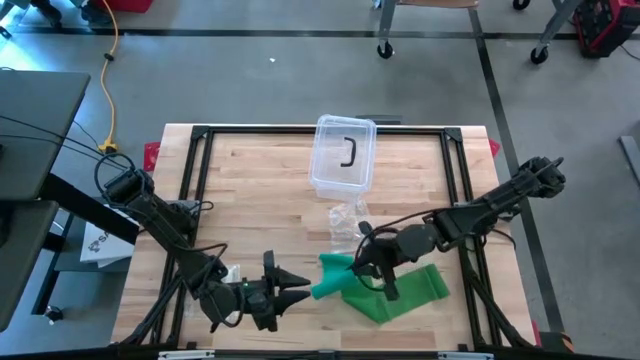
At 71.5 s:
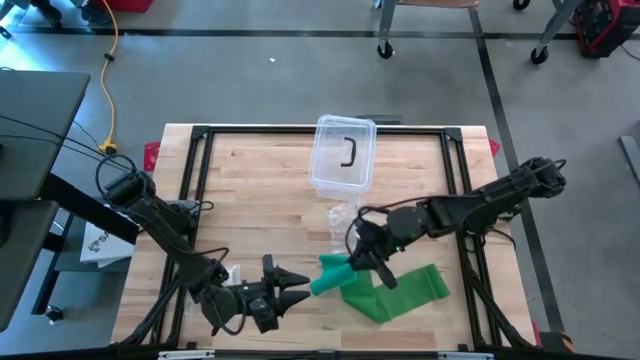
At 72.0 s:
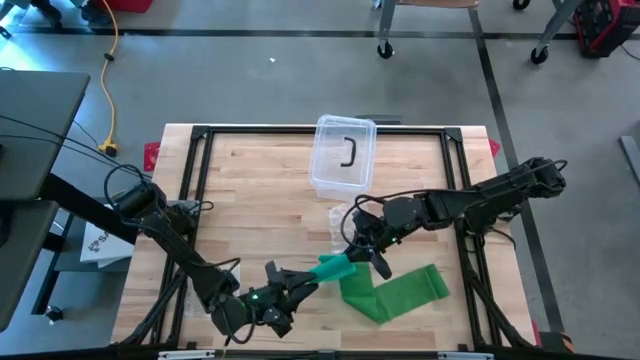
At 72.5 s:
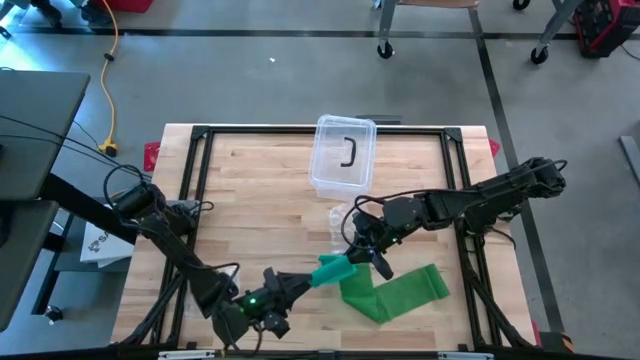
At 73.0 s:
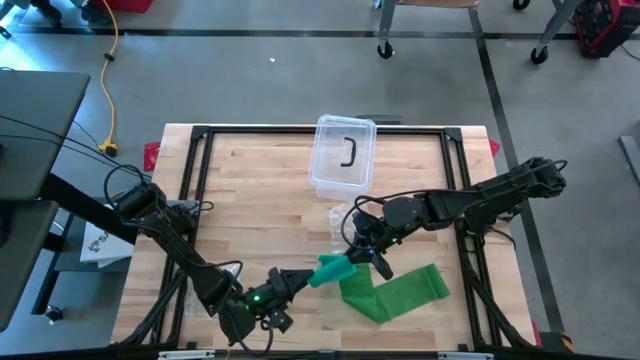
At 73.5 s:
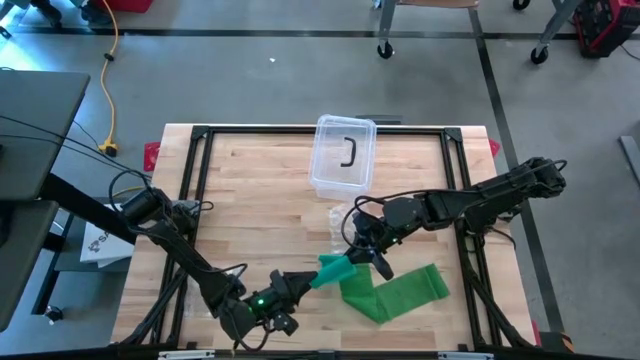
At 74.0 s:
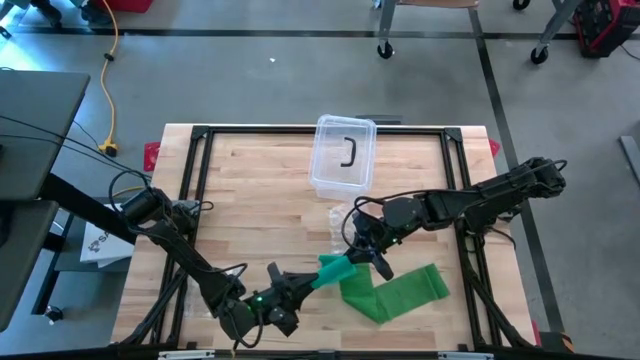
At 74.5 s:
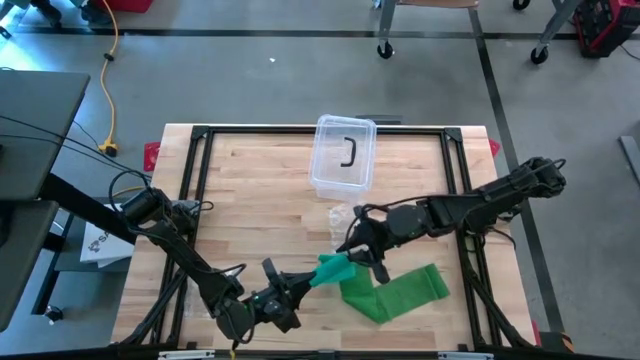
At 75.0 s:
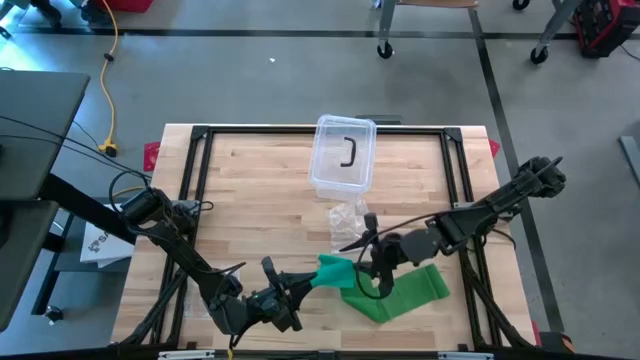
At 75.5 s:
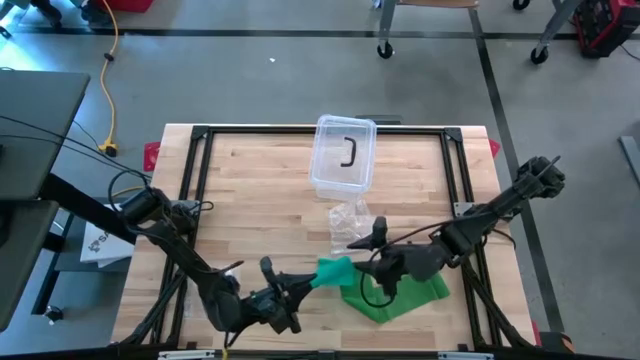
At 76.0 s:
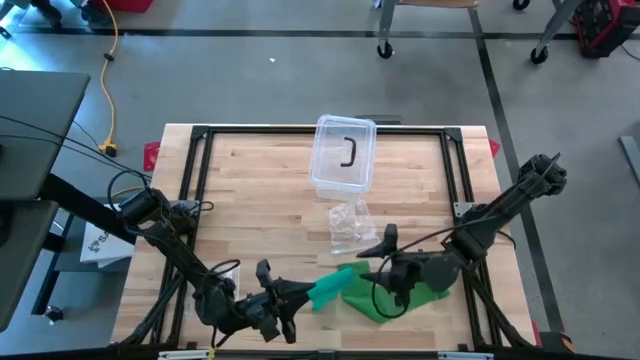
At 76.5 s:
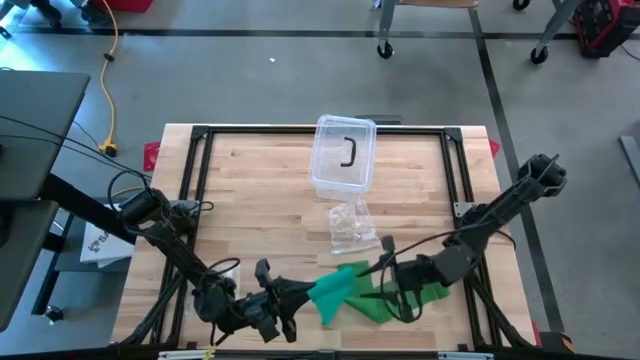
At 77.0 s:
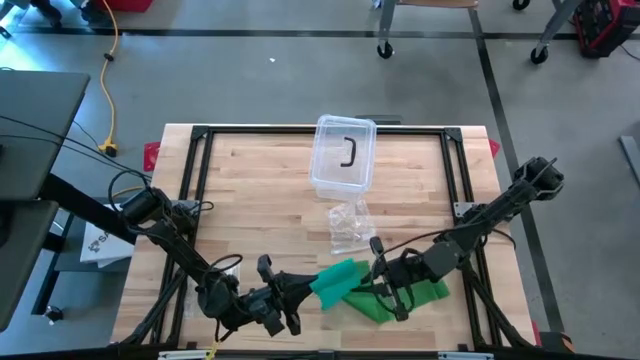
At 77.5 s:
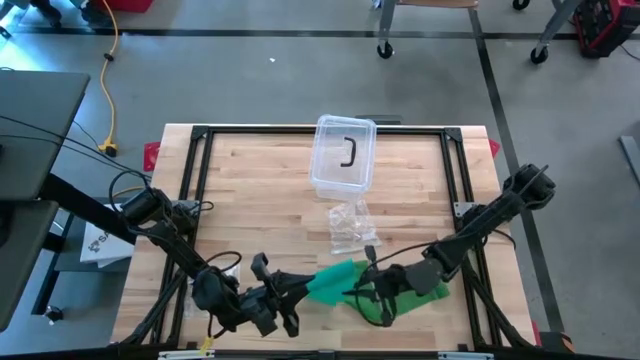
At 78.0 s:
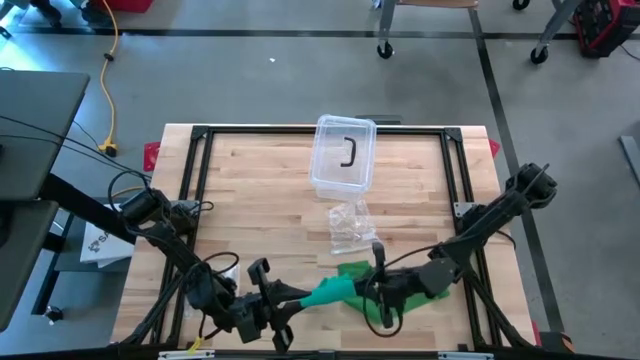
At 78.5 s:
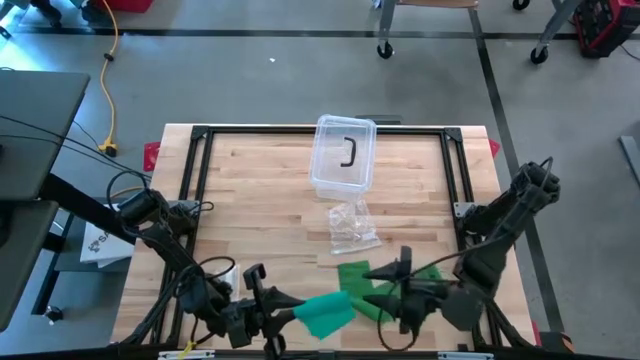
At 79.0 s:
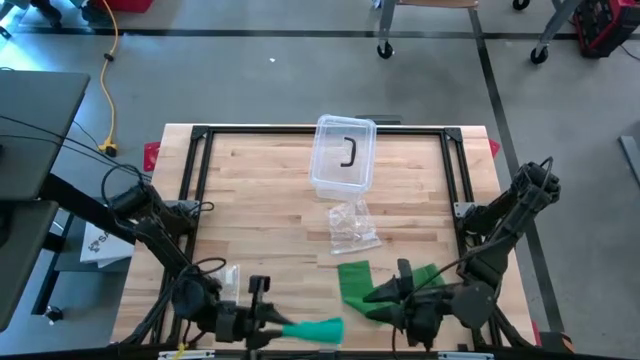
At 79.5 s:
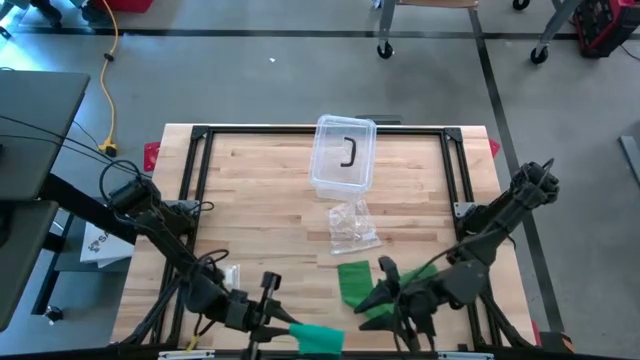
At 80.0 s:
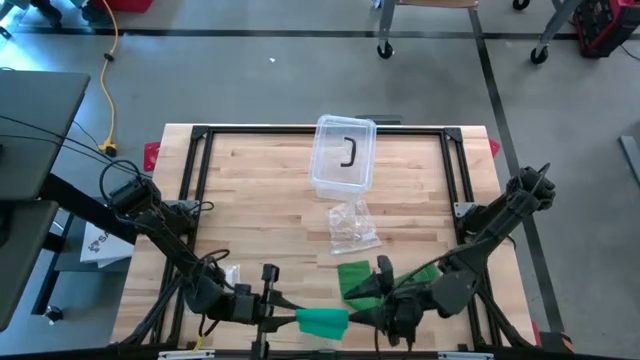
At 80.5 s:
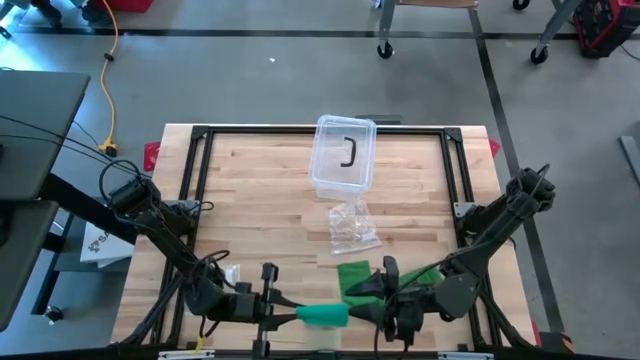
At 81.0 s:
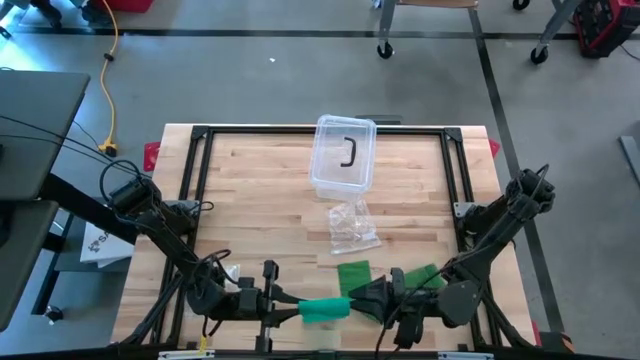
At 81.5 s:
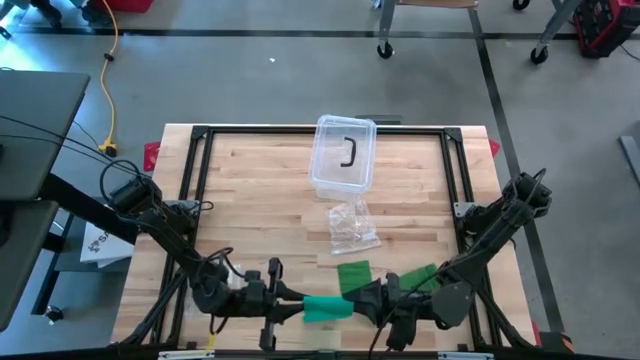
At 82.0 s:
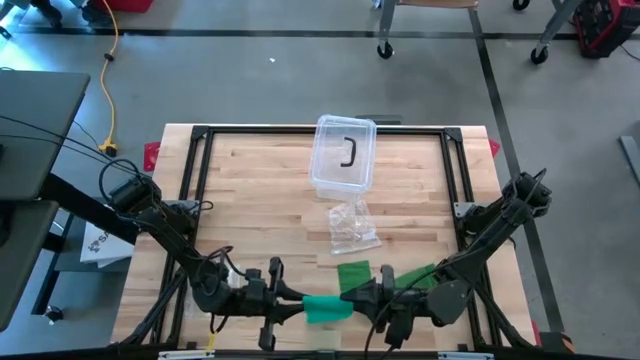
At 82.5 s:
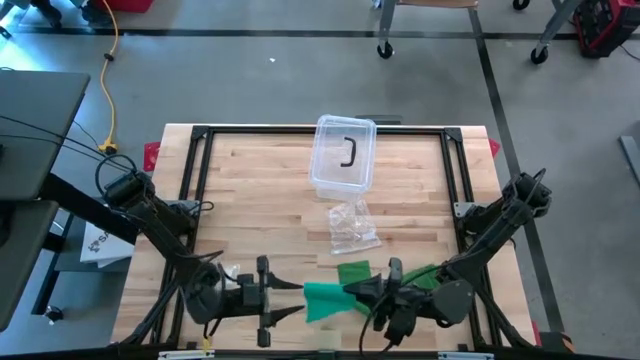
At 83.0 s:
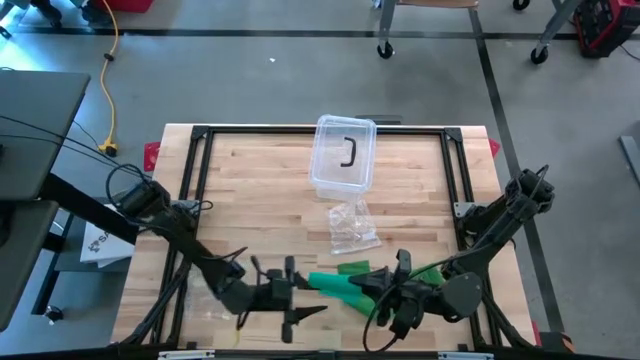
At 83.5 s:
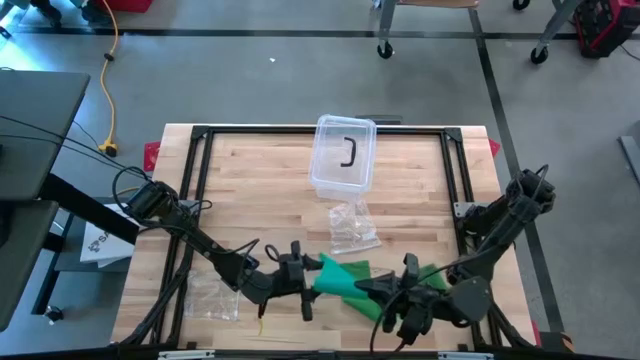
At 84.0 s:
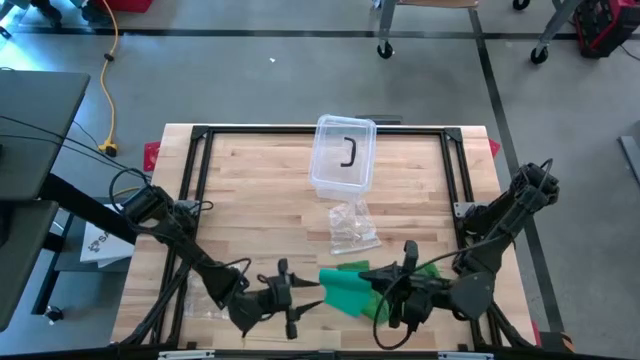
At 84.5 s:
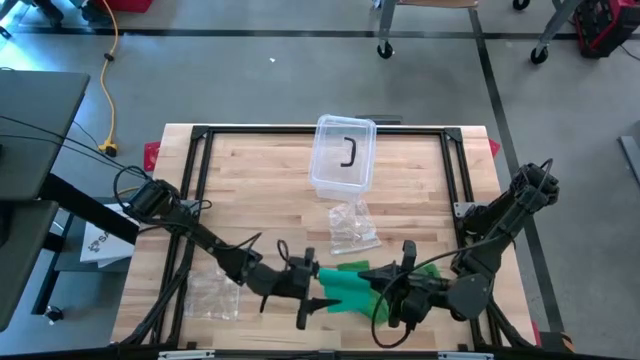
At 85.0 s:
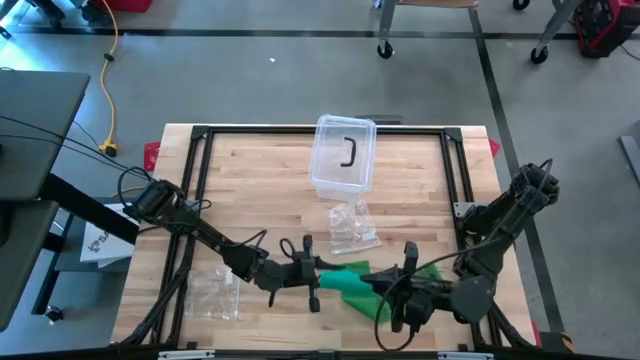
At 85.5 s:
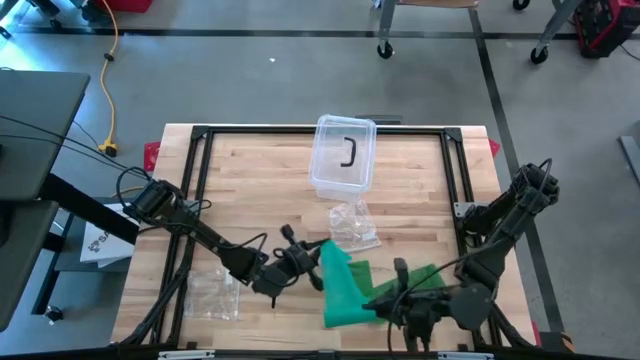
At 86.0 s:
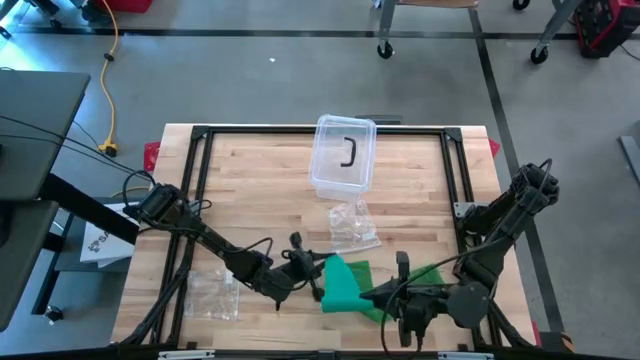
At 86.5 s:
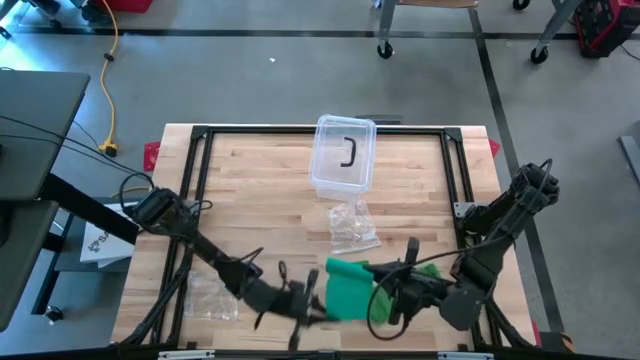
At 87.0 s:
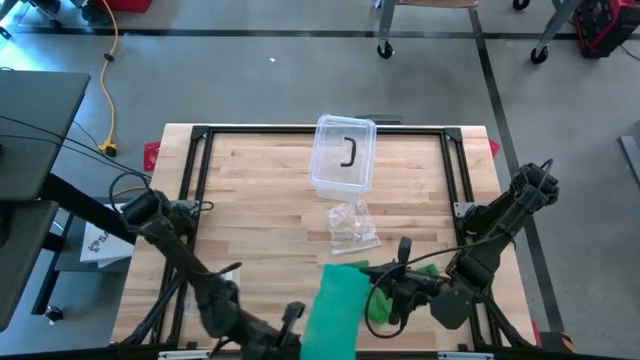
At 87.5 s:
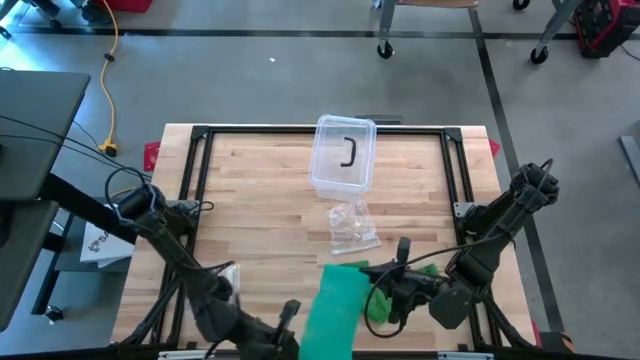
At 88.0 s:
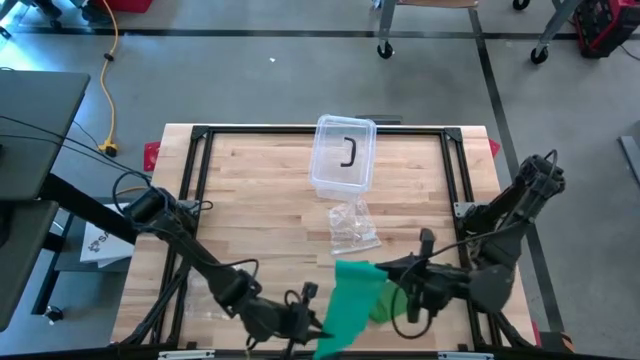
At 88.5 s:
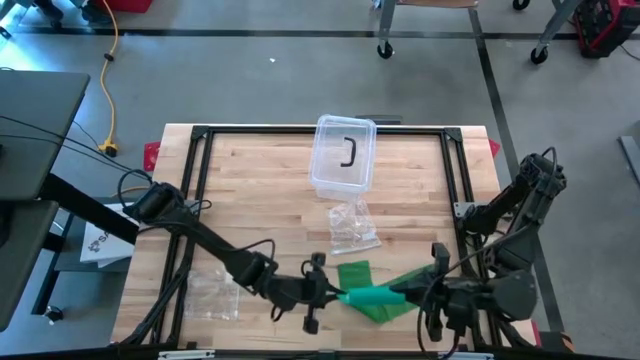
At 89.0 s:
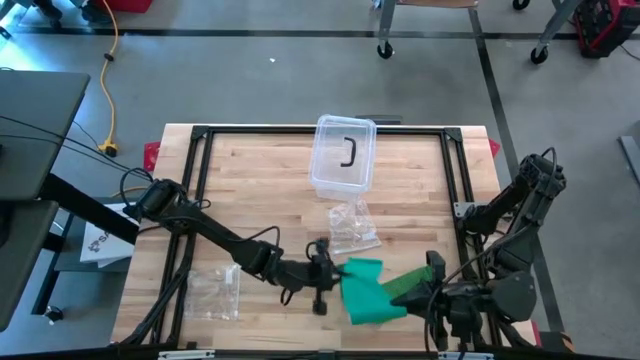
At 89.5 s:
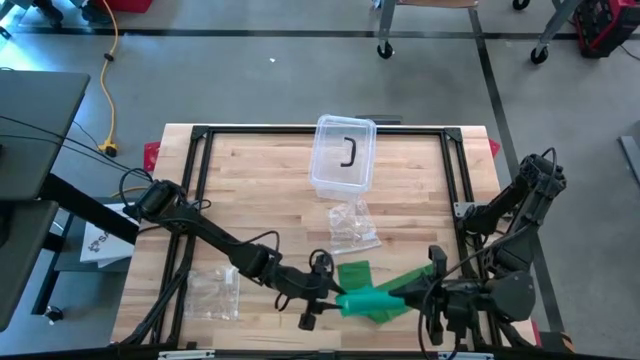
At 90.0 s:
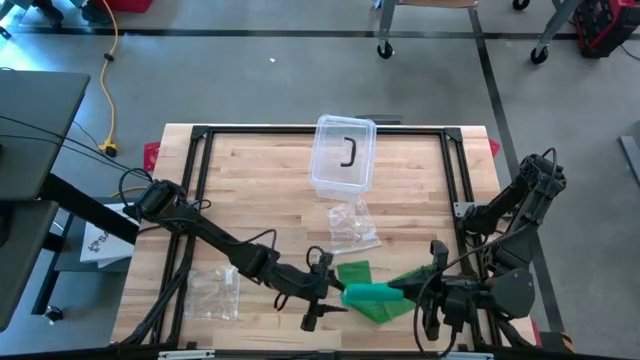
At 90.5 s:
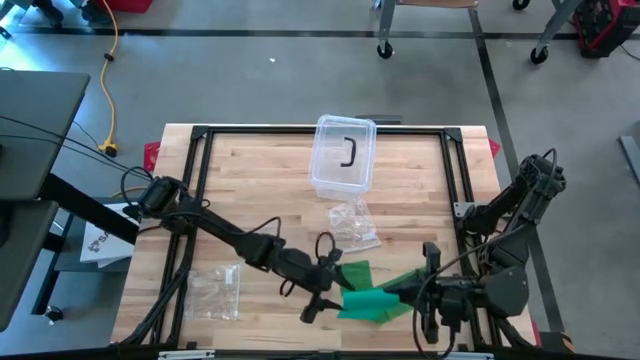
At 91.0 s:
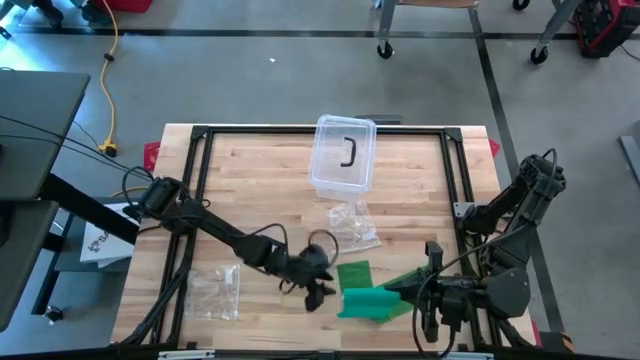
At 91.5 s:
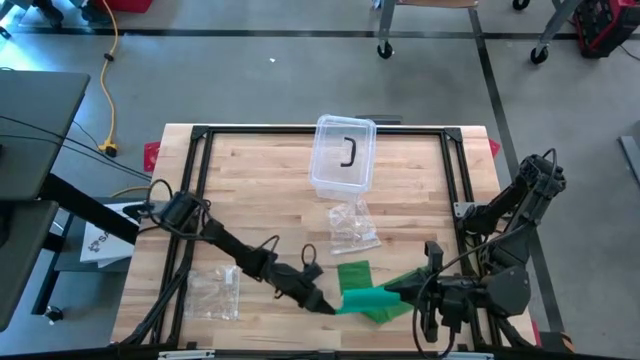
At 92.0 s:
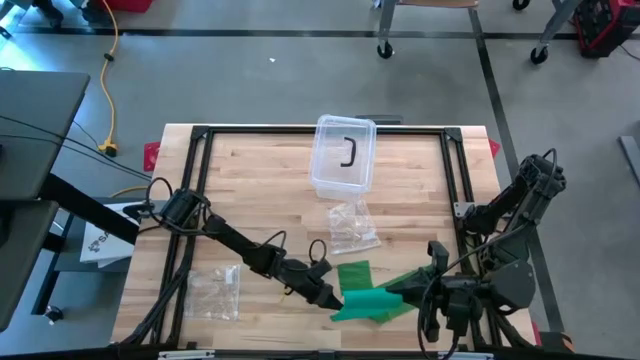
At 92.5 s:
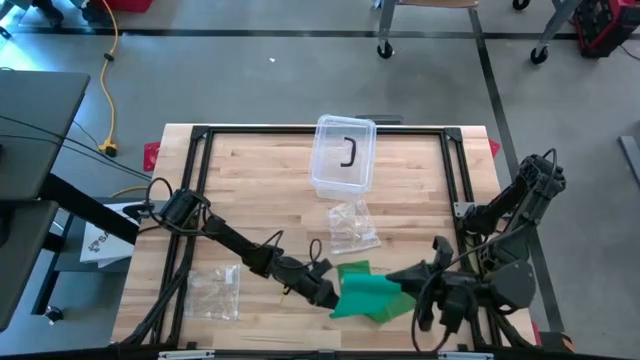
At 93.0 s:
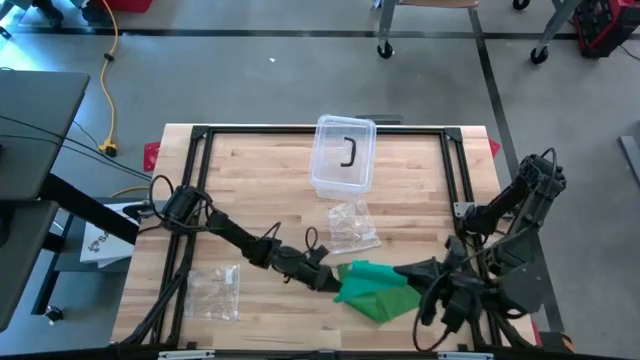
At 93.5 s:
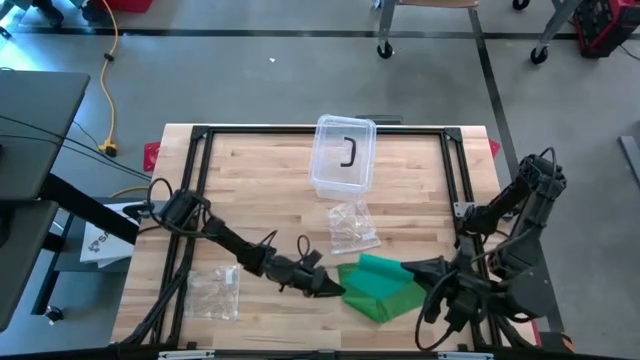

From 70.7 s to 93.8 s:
Task: Roll bandage
Roll the blue bandage
